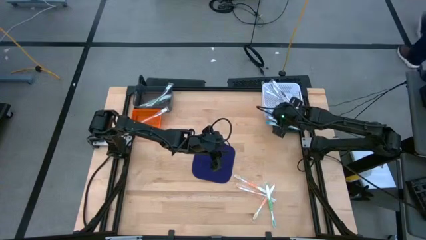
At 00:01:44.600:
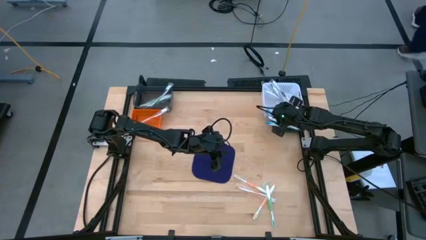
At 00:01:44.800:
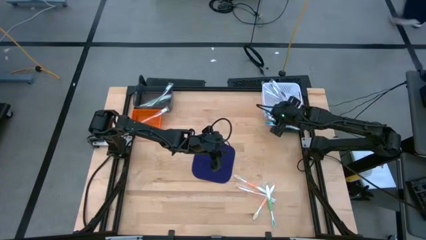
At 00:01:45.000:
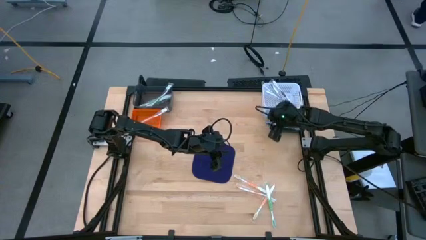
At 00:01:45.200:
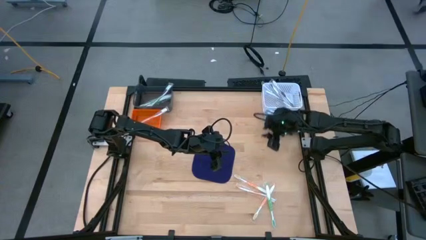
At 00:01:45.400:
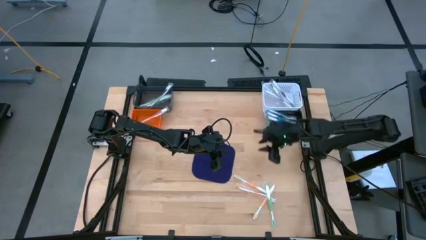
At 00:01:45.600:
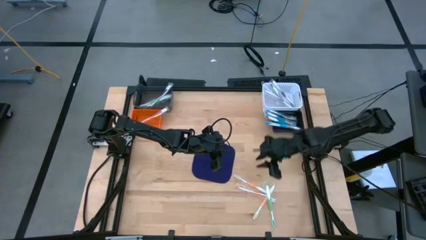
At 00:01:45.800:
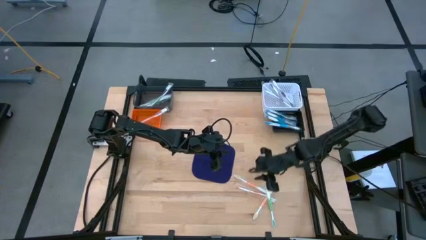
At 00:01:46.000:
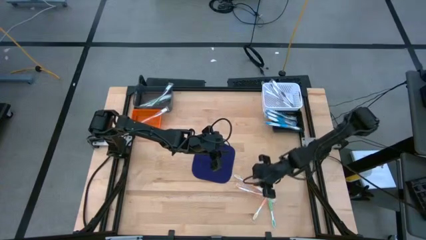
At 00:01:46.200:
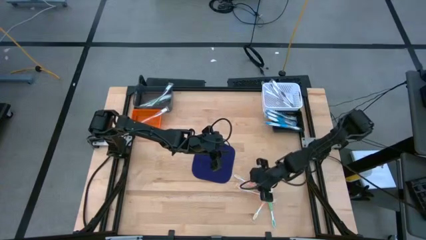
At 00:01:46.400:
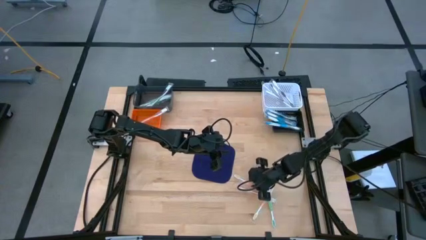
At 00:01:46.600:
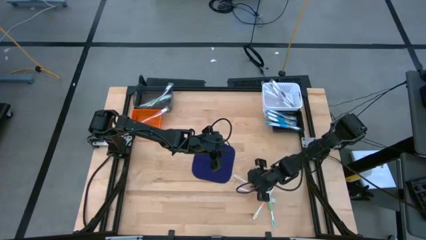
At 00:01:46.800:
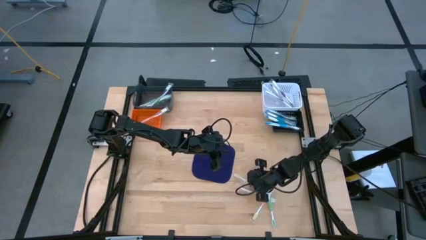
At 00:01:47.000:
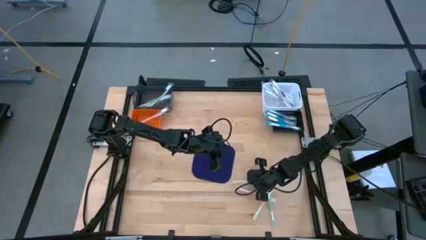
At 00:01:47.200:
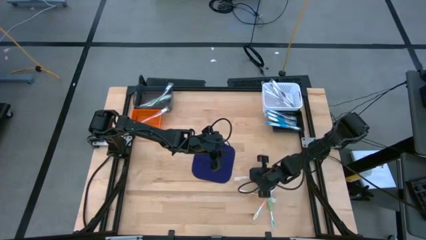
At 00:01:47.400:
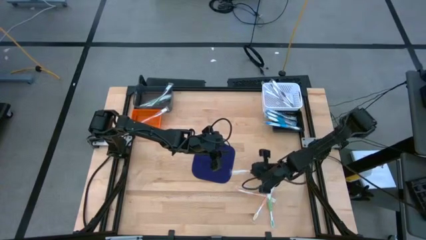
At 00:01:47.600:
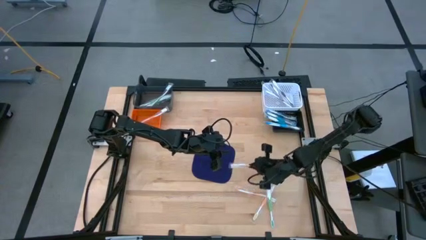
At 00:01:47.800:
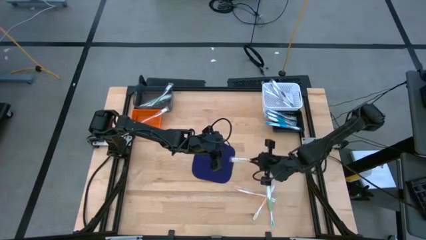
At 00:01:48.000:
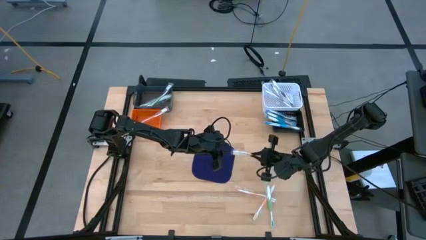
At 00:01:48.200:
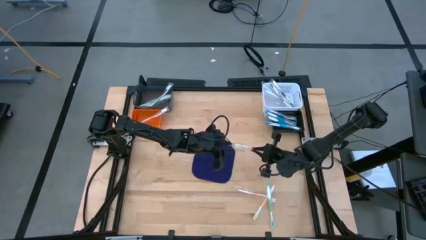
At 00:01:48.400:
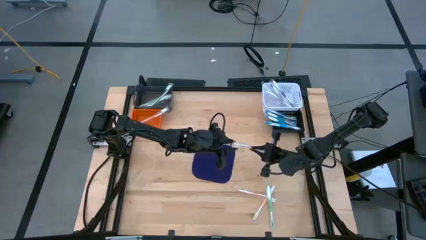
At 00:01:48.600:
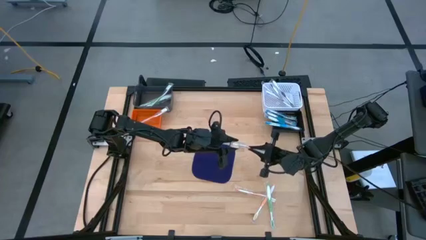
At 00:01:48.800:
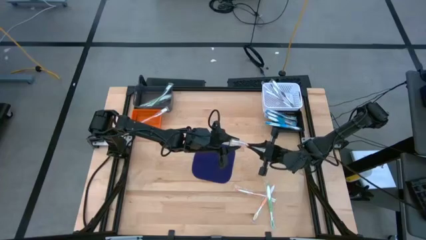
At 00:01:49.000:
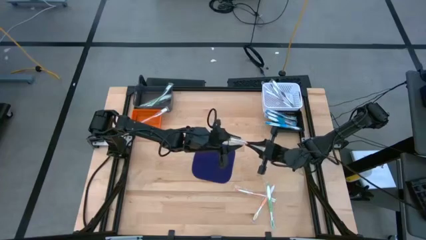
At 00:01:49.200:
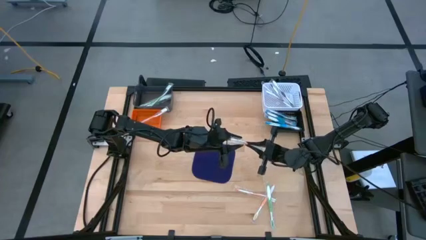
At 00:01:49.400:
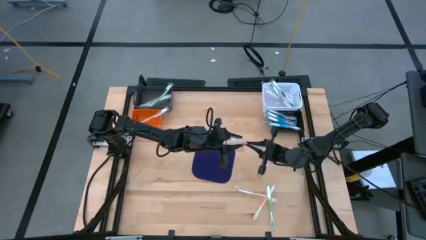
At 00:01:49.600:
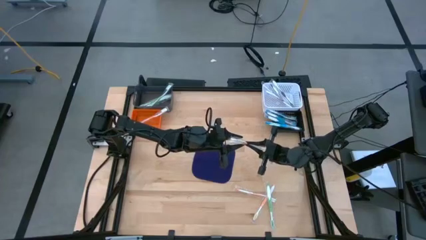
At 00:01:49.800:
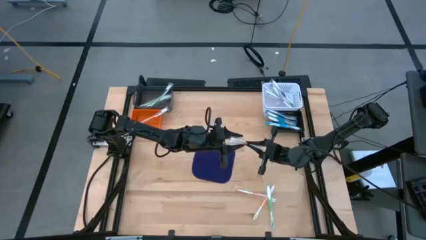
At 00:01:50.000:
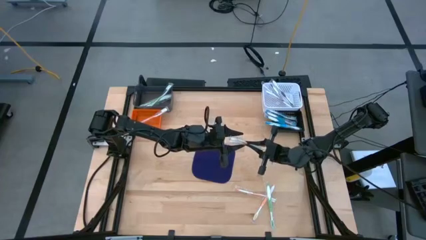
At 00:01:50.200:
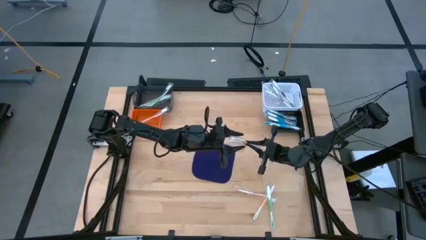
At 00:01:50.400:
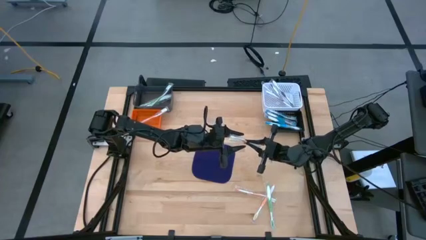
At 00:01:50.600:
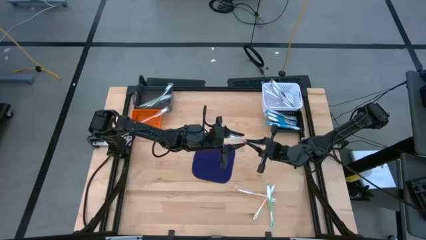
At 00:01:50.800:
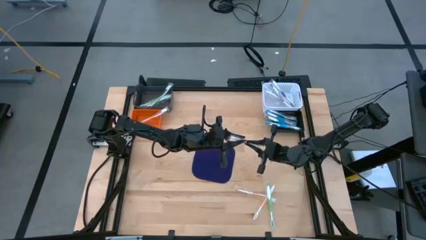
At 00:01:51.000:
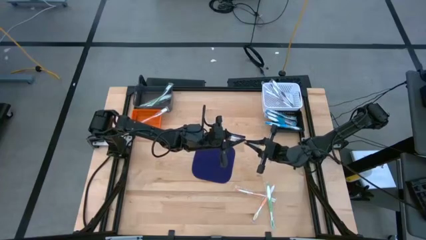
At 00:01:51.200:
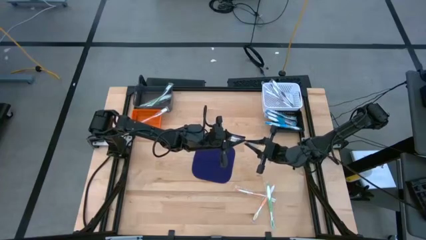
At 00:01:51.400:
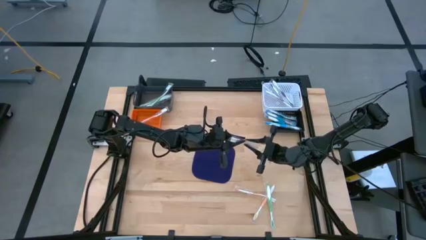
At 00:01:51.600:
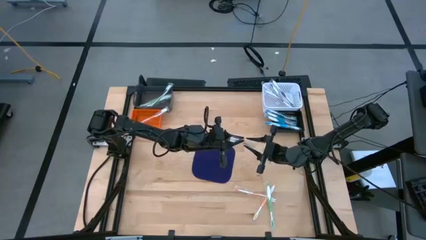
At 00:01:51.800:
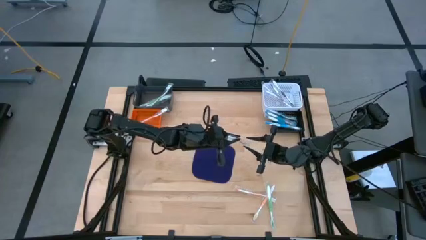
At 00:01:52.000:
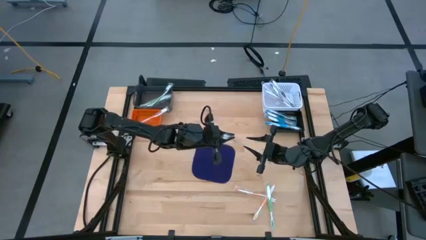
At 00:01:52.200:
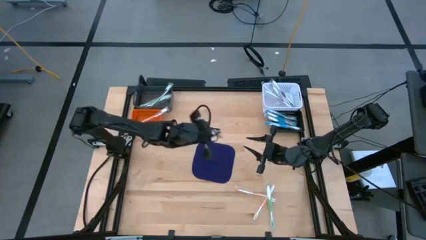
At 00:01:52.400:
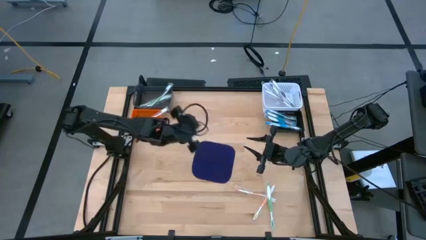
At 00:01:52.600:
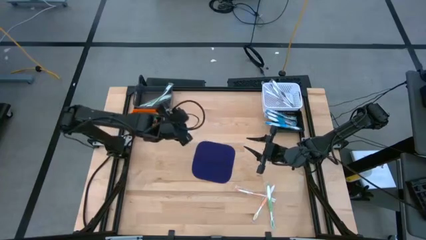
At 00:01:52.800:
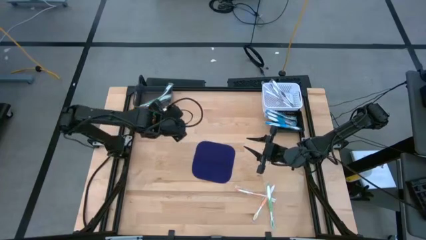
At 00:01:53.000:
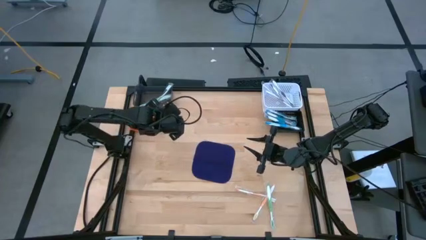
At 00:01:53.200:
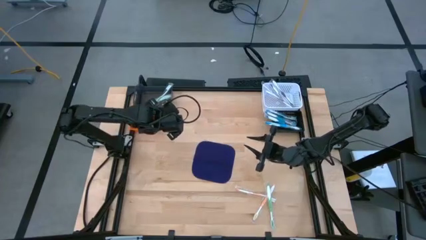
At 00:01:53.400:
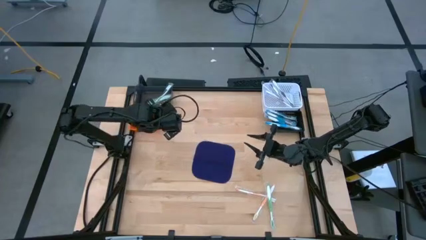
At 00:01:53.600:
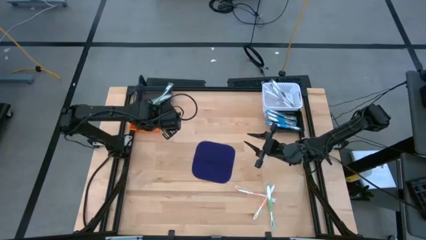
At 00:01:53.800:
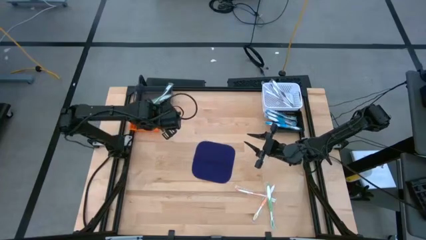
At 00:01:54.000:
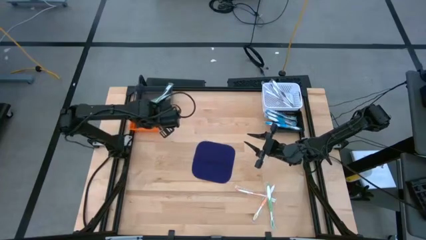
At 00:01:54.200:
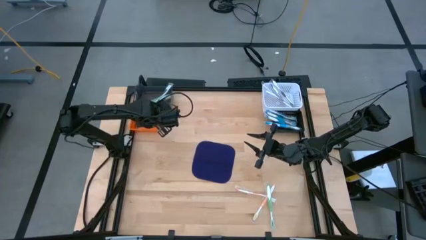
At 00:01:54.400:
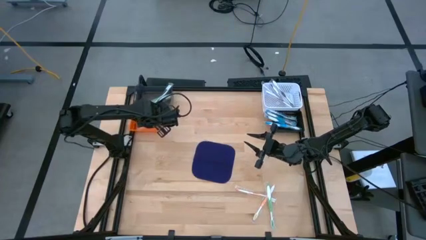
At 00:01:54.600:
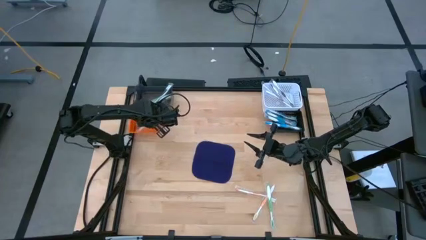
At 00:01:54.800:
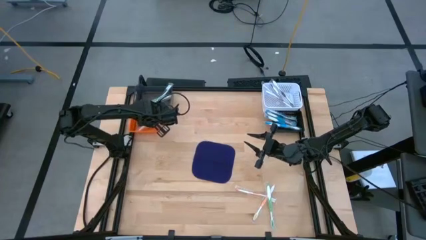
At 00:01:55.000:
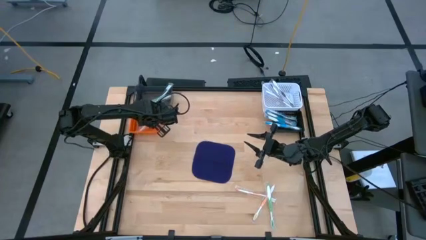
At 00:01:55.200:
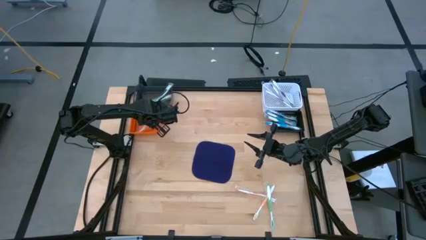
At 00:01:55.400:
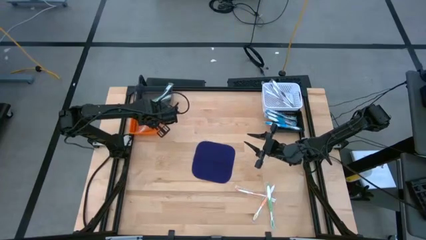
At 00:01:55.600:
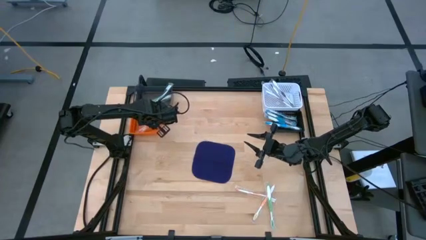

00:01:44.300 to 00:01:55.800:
Task: Pick & Place Toothbrushes
Put the orange toothbrush into the orange bin

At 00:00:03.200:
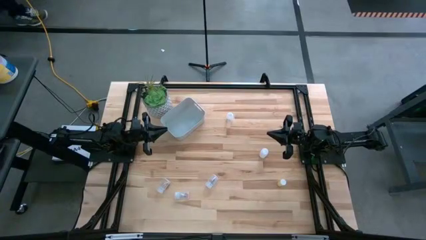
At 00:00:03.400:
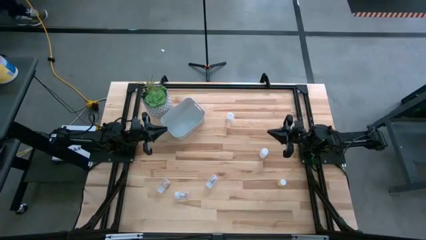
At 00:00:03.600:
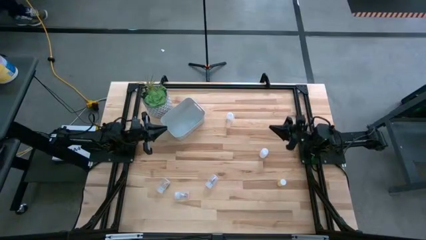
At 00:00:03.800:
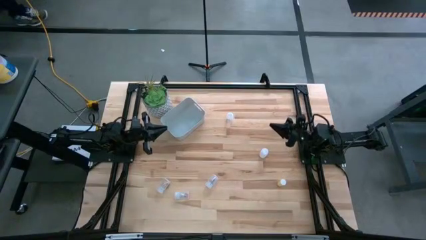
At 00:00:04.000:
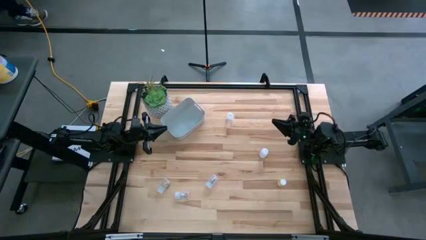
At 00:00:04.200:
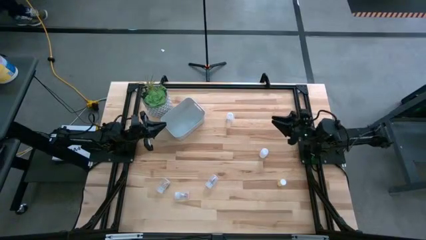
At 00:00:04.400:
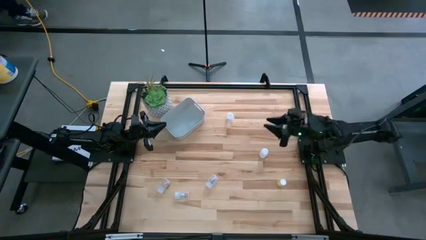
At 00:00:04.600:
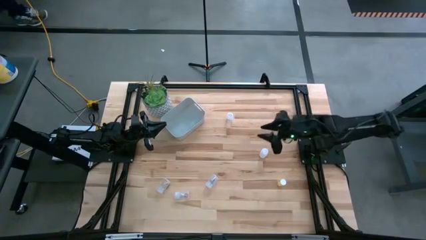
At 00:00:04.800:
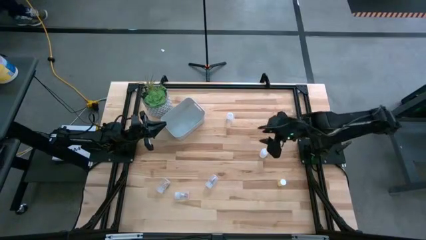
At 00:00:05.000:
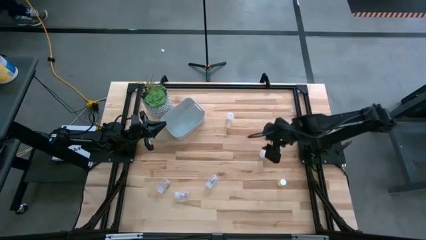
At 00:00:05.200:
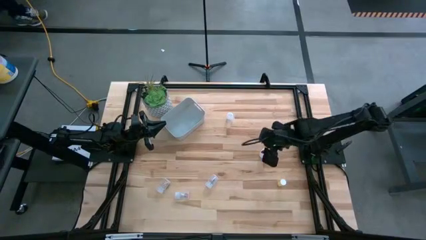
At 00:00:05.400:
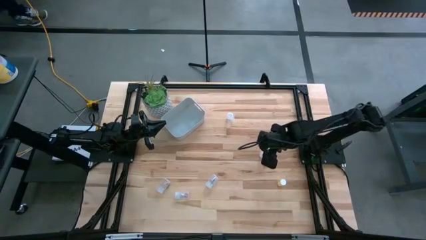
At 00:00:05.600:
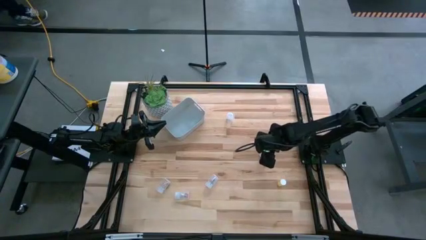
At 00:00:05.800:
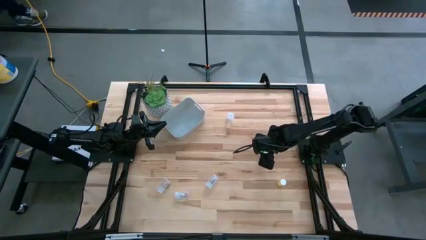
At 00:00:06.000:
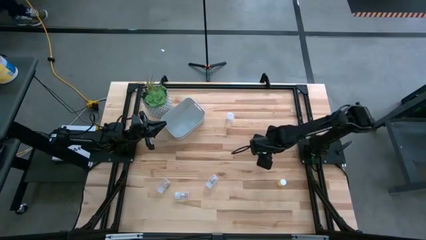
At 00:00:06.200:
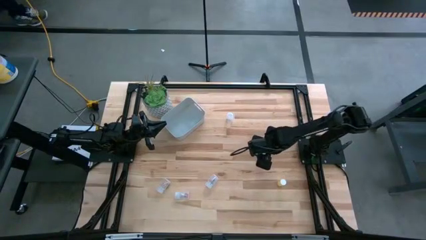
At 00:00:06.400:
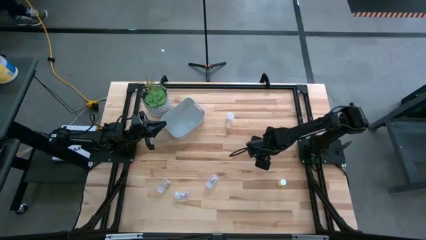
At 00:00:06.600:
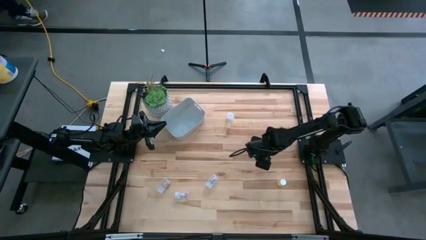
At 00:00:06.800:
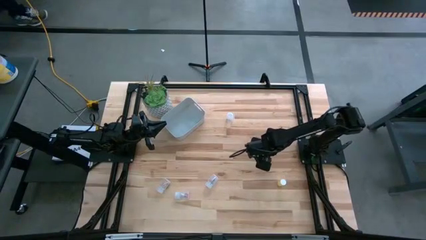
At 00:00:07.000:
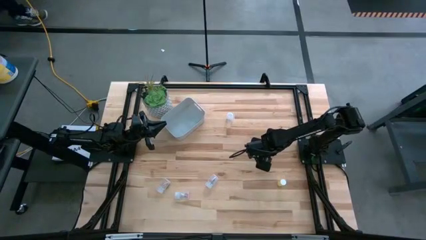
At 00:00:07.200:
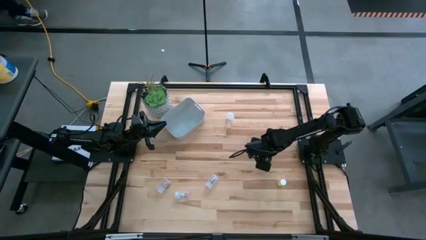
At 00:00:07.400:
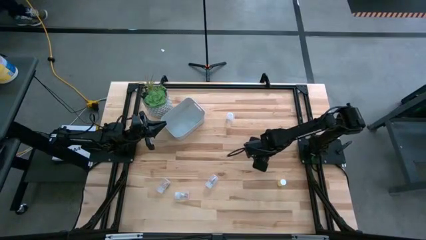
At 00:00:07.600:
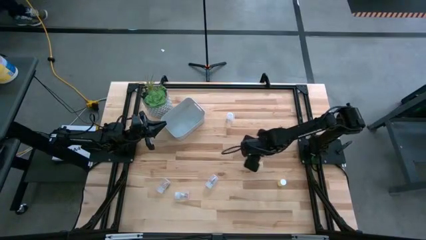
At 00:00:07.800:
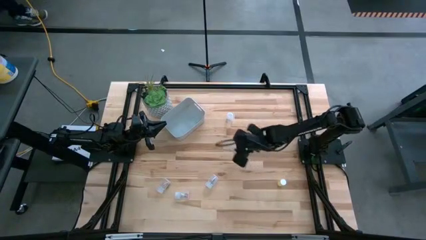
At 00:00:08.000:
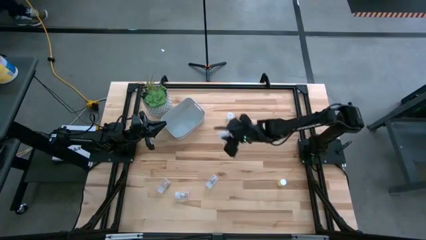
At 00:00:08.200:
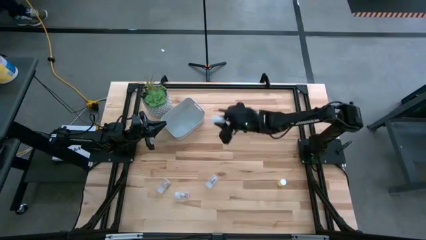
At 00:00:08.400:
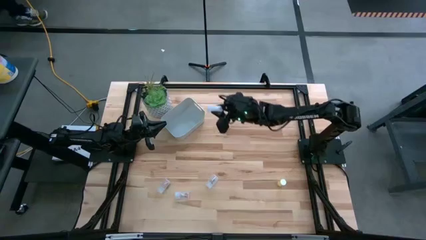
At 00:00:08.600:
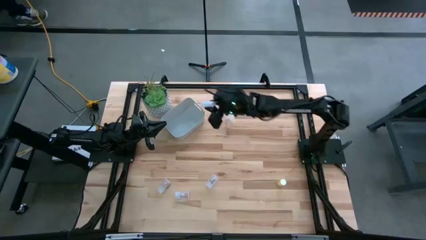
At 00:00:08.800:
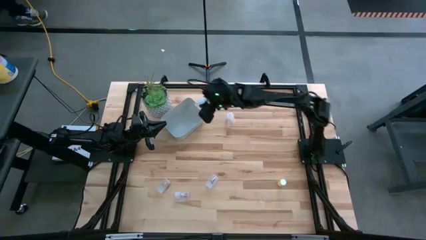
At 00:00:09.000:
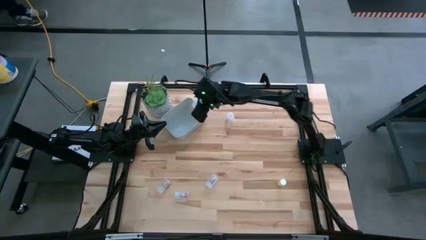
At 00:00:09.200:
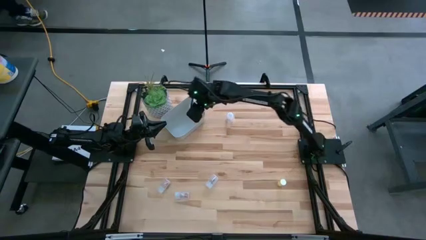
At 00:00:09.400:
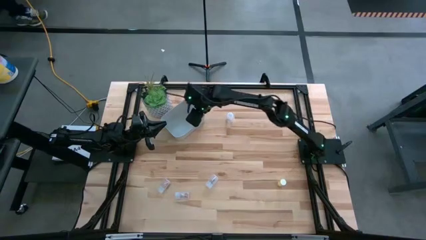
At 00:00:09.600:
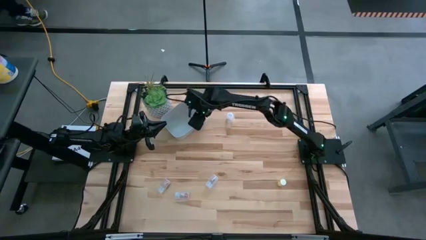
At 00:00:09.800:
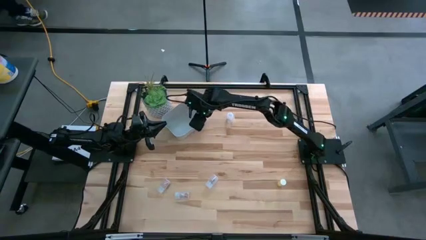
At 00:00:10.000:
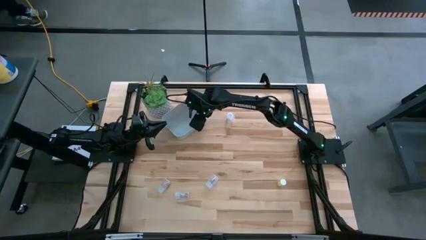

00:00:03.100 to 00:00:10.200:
Task: Pick and place pill bottles into a basket
Put the white pill bottle into the bin
